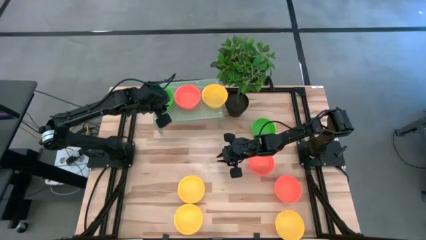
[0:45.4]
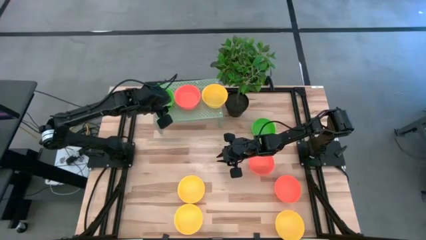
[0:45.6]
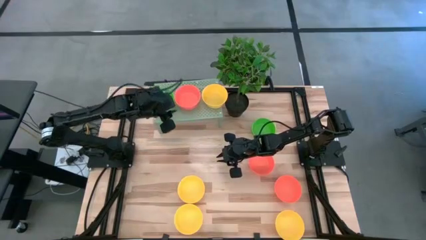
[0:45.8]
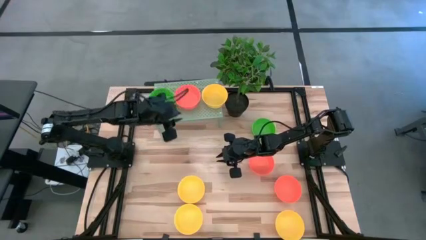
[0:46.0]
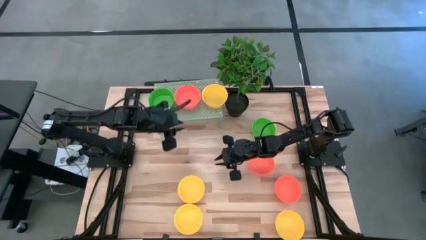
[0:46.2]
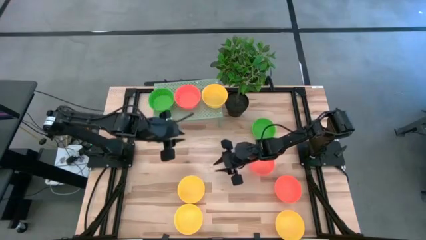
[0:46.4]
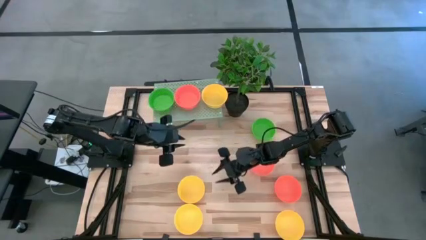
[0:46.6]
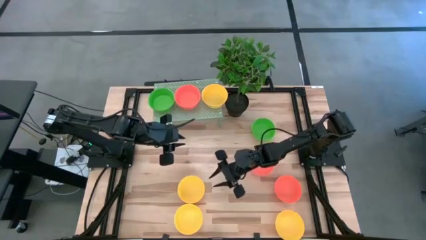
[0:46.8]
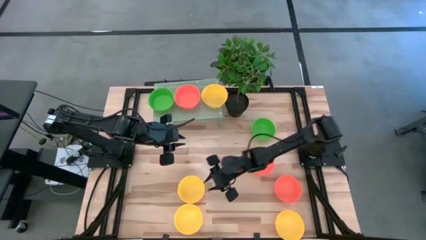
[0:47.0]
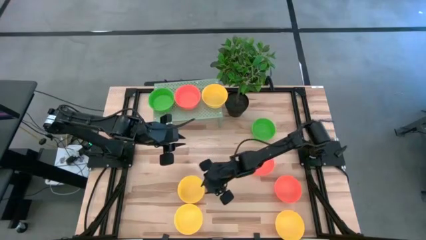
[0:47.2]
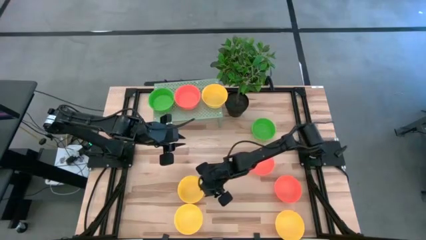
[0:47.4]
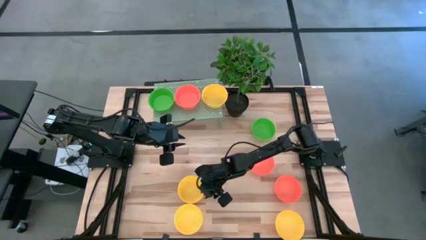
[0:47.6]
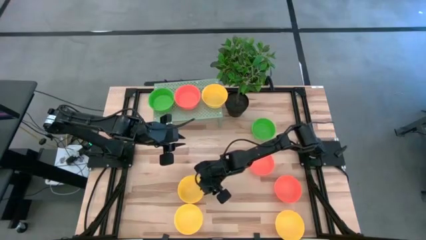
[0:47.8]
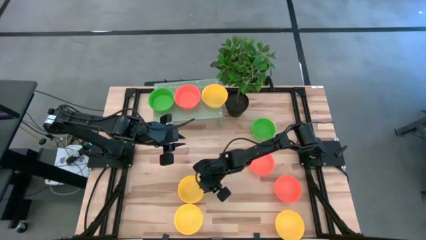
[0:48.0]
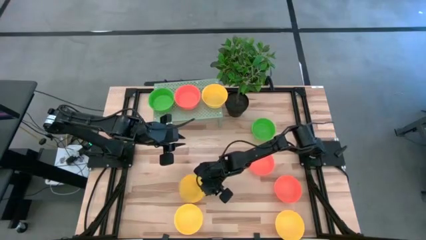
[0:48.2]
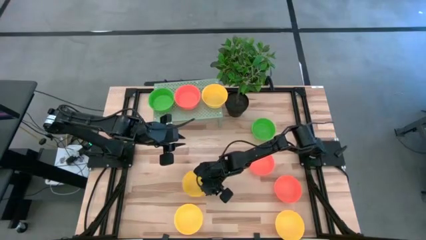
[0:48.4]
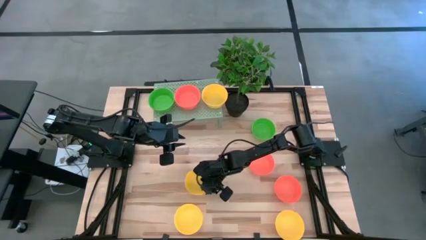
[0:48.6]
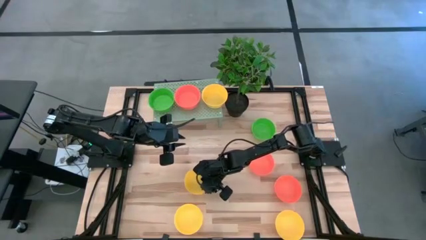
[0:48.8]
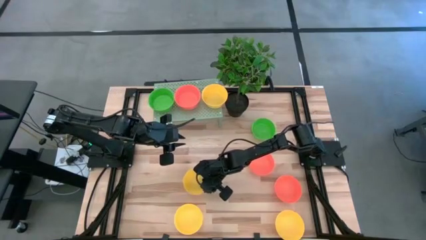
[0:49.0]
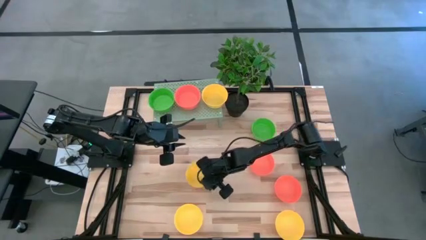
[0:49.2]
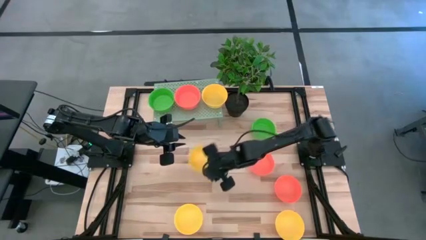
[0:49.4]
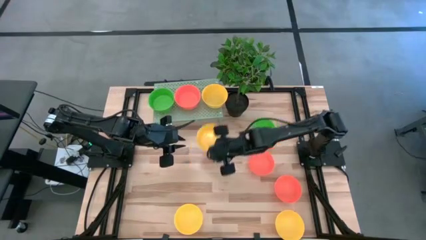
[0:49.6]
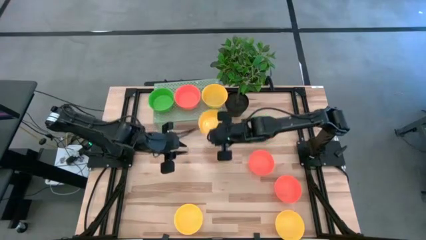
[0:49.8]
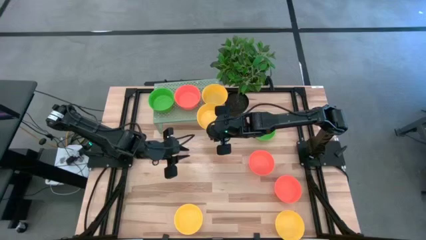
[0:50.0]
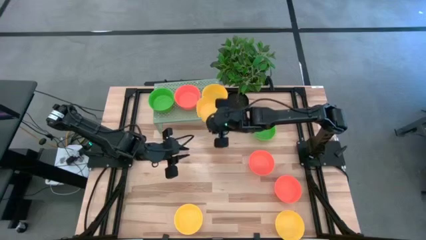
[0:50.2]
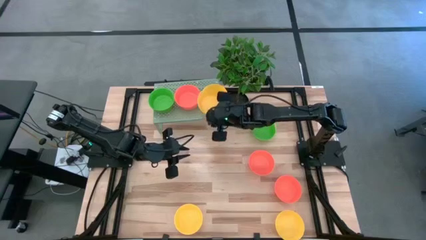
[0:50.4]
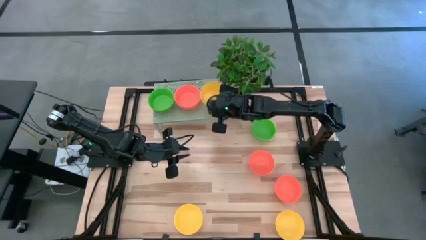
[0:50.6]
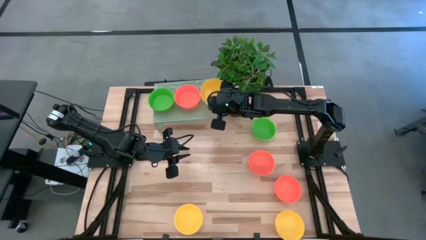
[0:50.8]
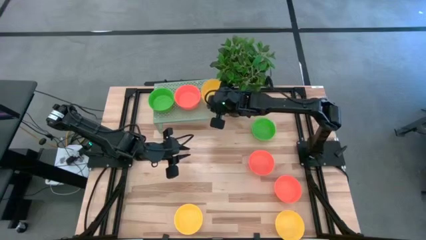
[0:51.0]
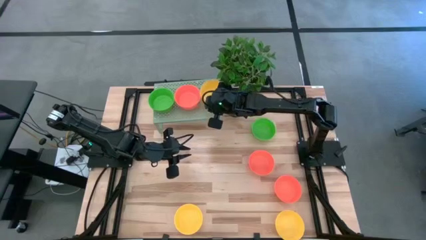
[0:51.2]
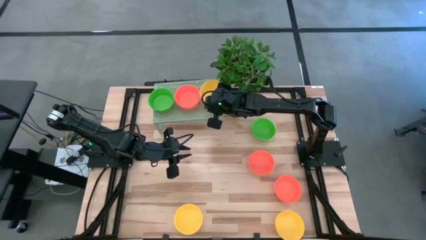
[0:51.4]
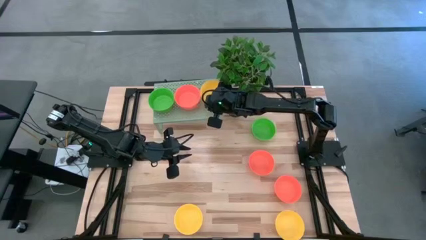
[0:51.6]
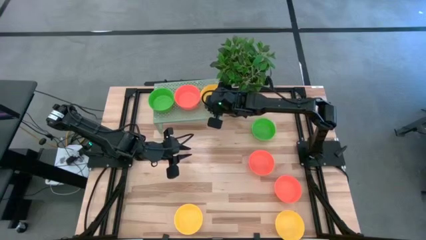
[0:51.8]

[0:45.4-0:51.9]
Task: Pick & Place Mini bowls
Stack the yellow bowl on the yellow bowl on the shelf

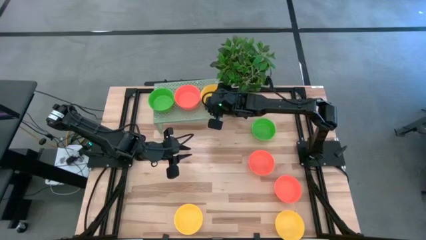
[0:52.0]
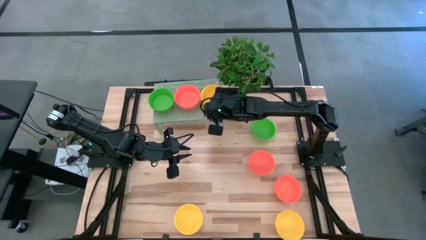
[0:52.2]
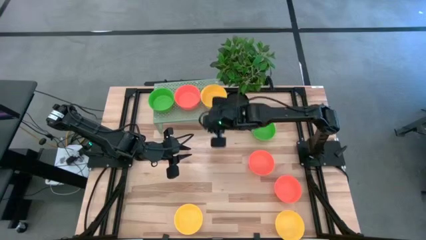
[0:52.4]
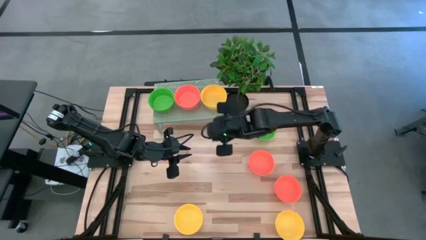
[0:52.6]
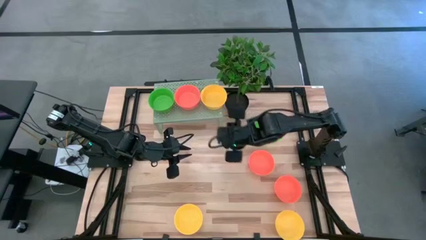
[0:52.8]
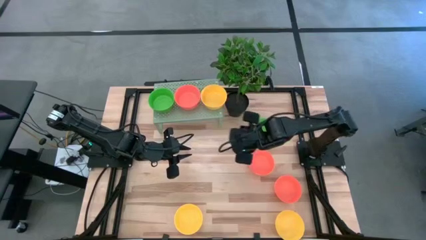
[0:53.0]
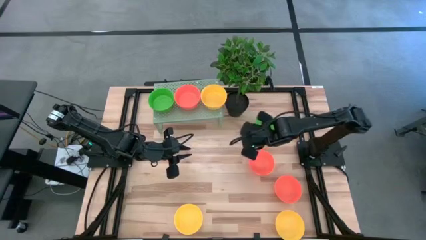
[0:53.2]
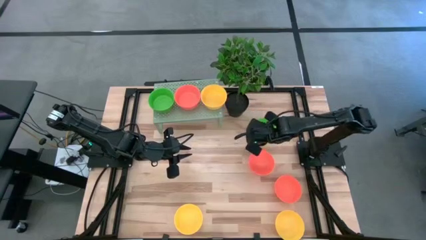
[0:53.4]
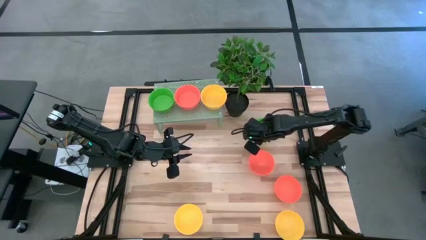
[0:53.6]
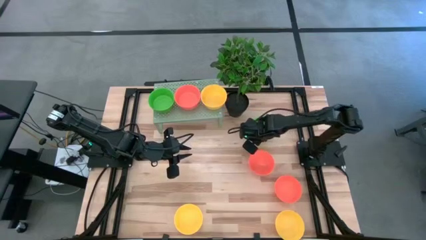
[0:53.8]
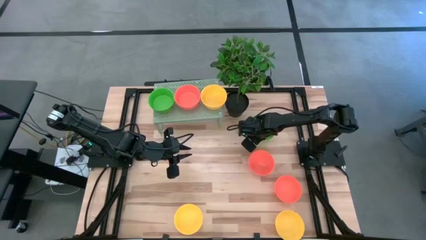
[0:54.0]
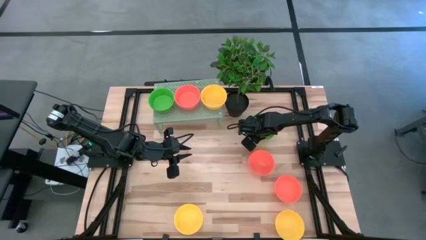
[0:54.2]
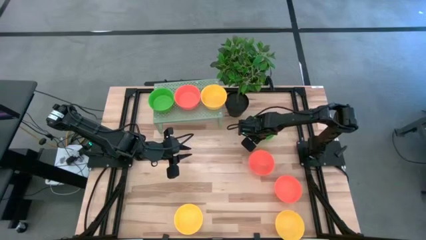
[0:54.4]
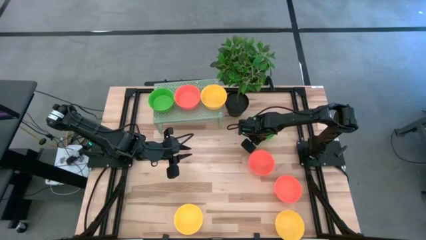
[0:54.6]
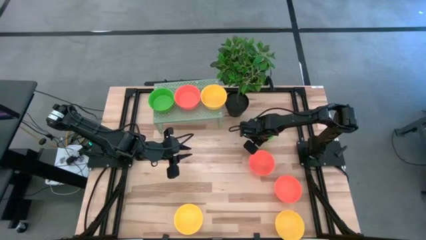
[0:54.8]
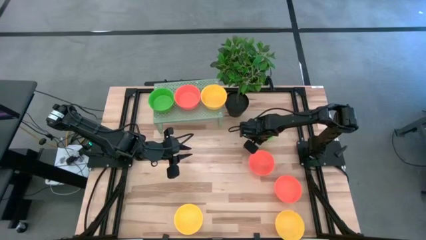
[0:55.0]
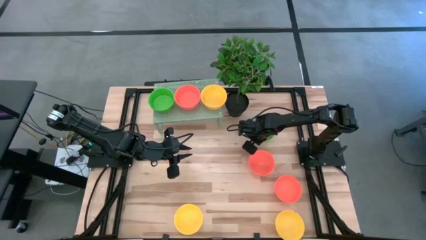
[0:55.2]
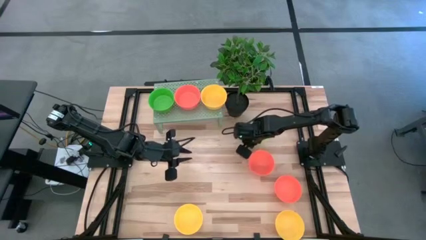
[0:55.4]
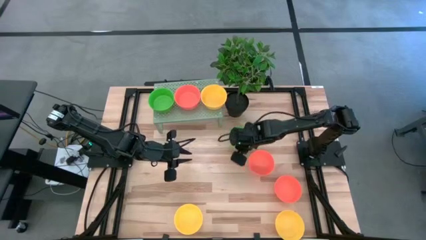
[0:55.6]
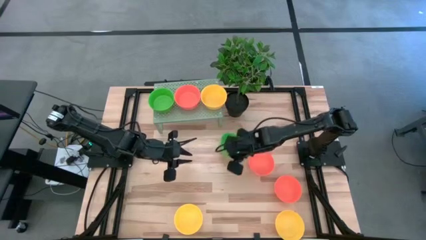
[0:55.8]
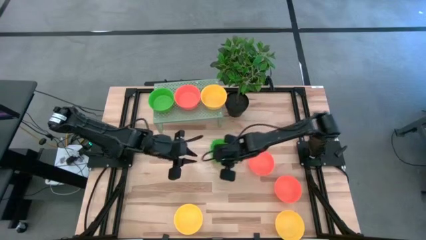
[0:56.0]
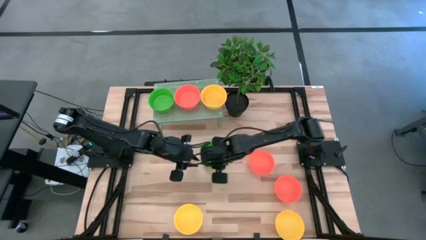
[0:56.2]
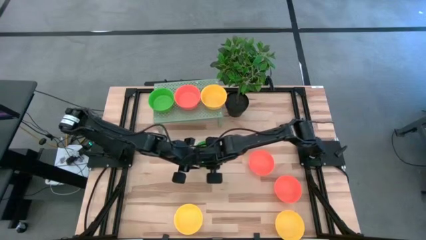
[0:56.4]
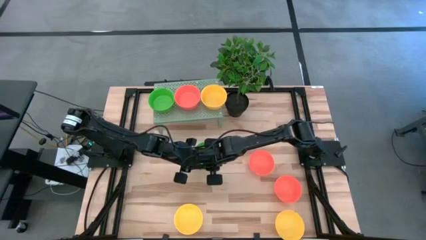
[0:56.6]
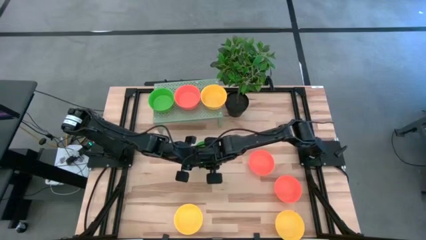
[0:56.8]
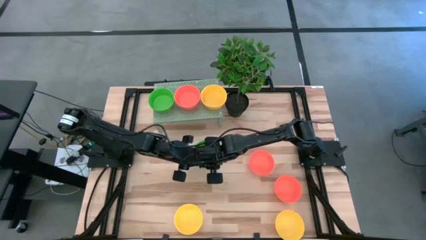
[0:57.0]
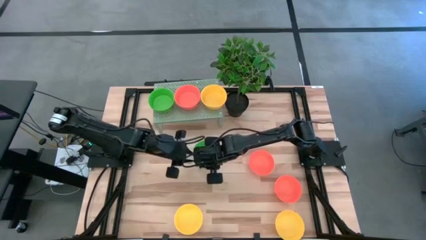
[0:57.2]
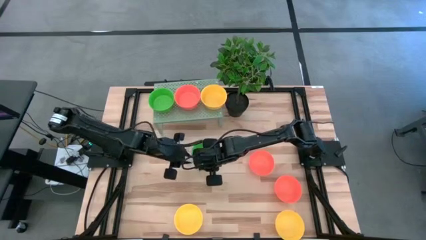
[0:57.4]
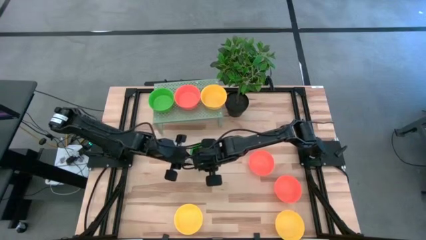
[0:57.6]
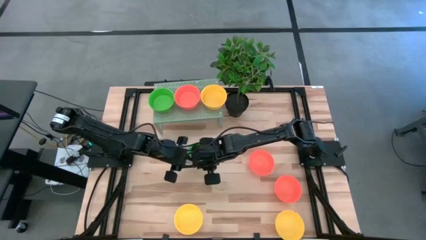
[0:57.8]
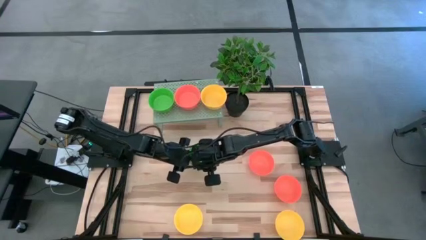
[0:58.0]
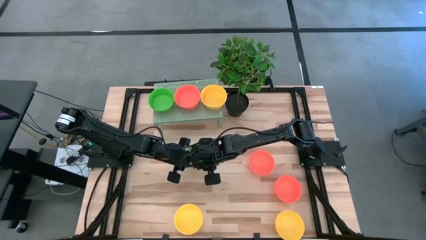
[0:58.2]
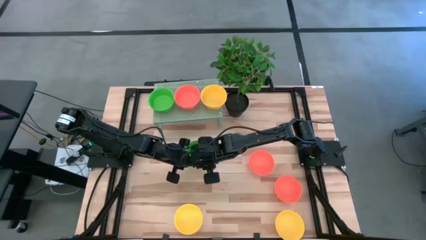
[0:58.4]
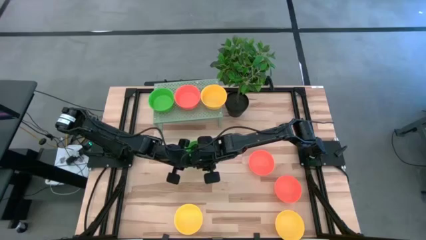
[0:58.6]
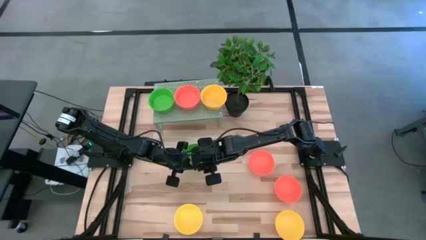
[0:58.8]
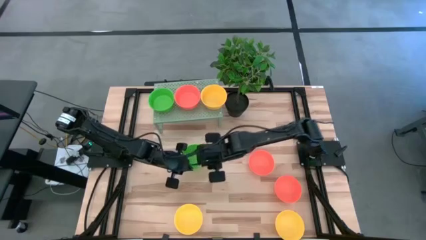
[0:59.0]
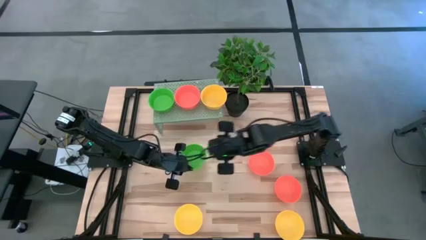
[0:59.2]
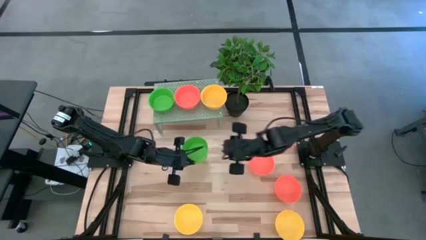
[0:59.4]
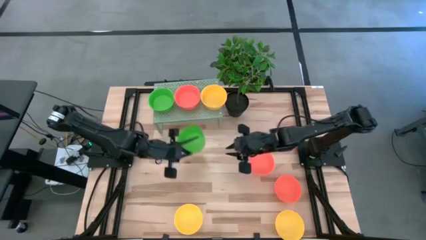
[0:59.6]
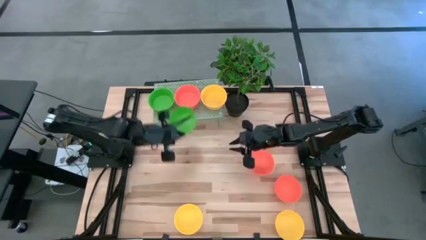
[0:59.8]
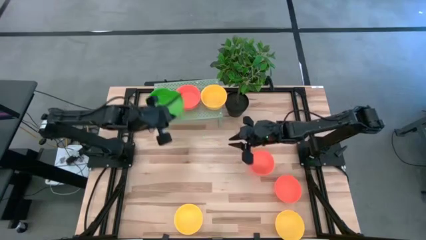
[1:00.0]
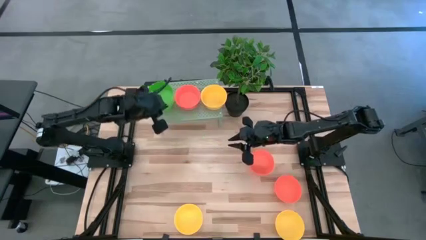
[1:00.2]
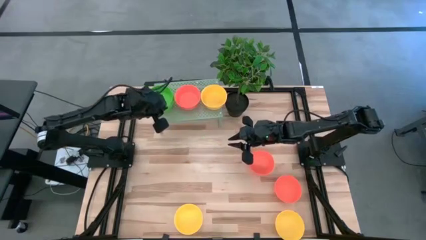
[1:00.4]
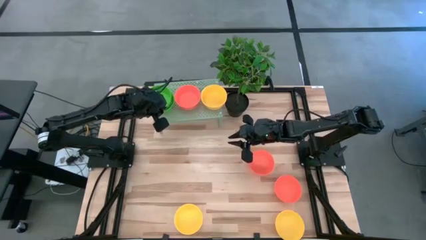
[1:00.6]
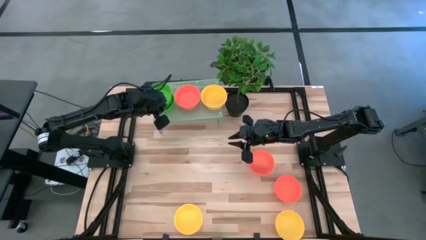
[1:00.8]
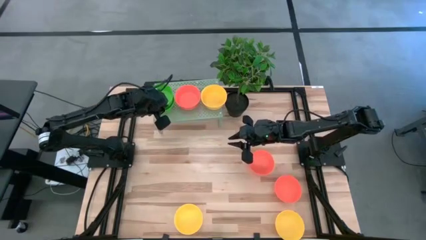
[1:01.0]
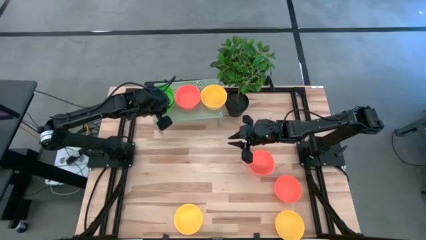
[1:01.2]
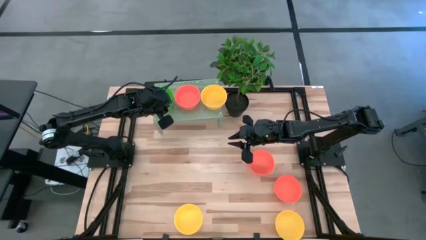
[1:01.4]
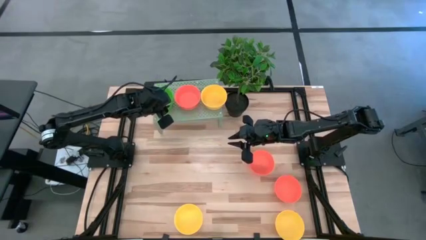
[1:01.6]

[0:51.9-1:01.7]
Stack the green bowl on the green bowls on the shelf
